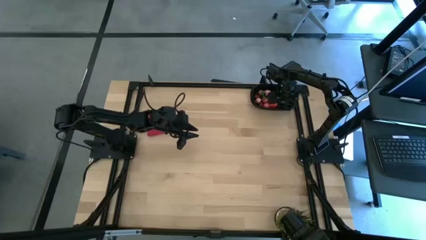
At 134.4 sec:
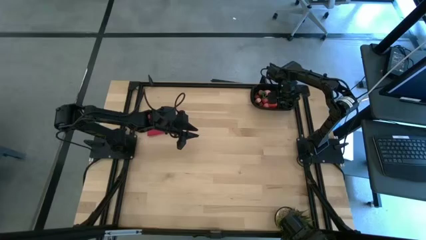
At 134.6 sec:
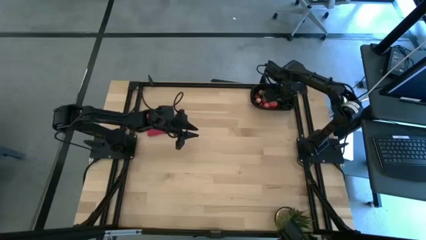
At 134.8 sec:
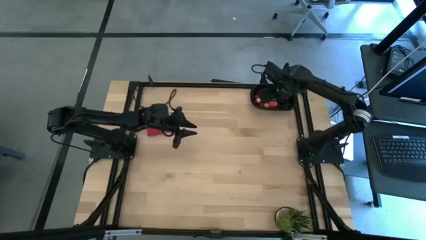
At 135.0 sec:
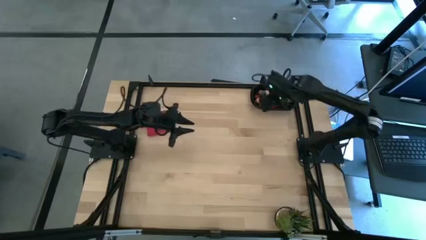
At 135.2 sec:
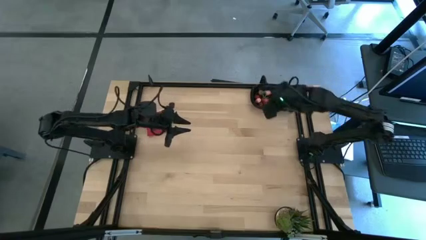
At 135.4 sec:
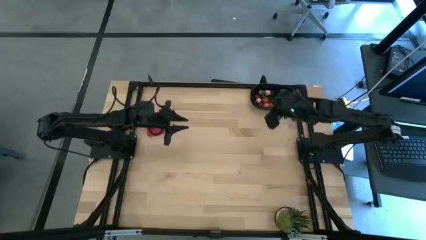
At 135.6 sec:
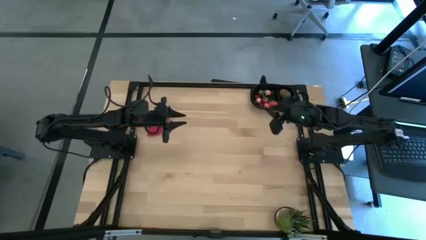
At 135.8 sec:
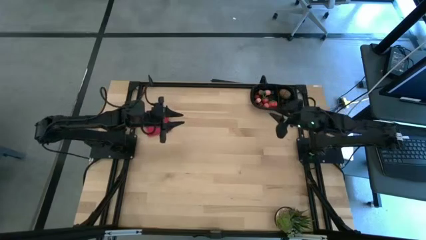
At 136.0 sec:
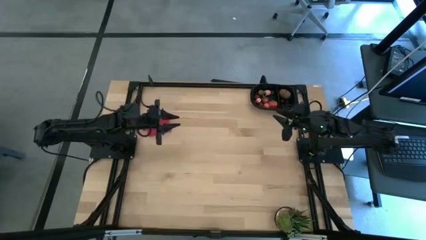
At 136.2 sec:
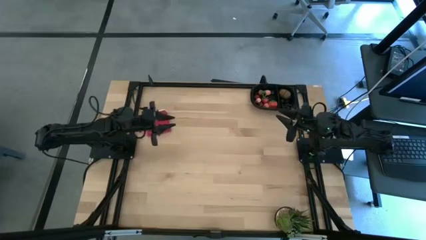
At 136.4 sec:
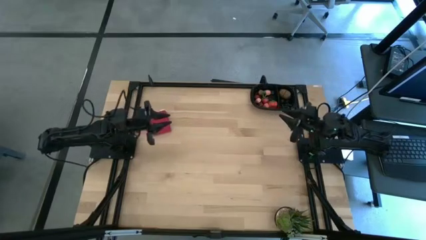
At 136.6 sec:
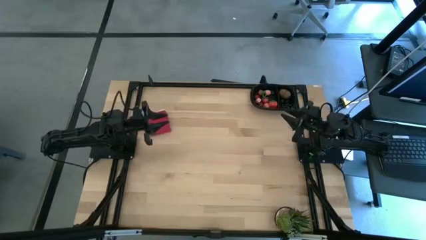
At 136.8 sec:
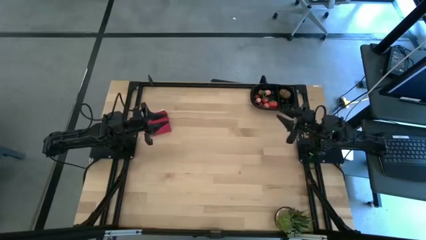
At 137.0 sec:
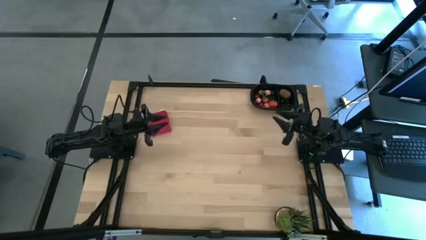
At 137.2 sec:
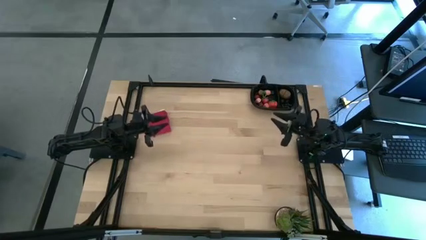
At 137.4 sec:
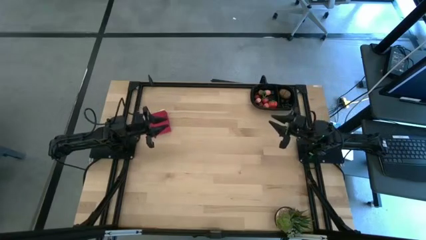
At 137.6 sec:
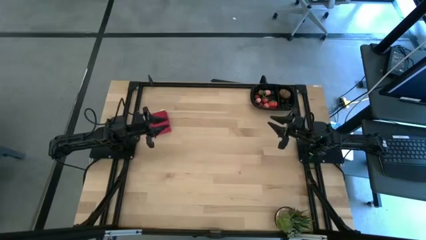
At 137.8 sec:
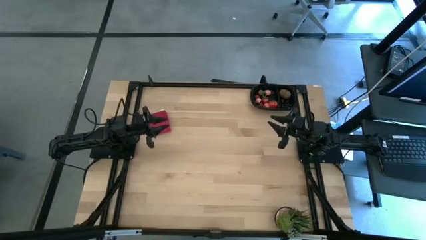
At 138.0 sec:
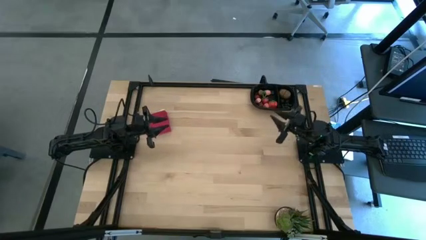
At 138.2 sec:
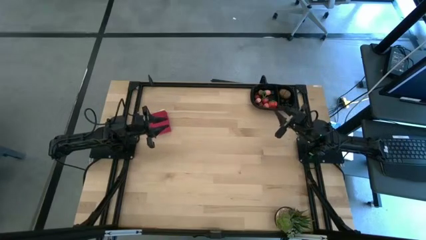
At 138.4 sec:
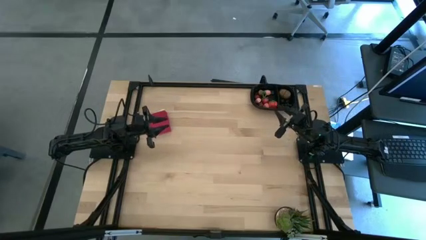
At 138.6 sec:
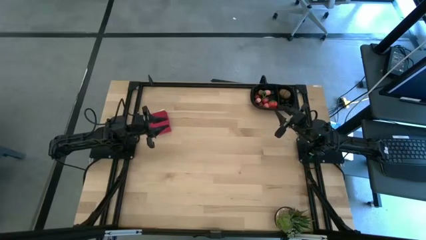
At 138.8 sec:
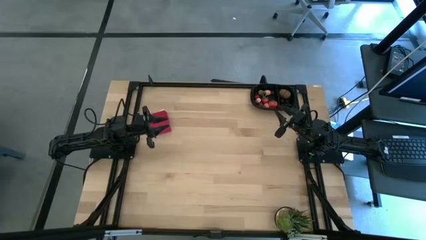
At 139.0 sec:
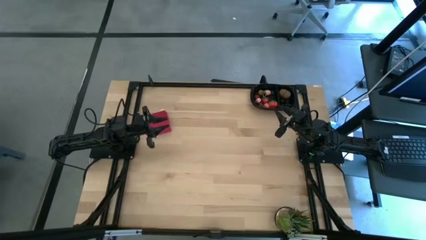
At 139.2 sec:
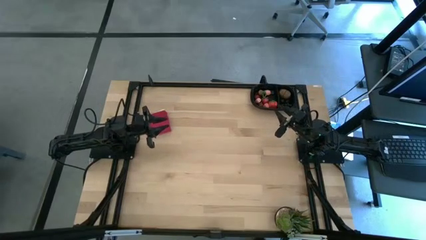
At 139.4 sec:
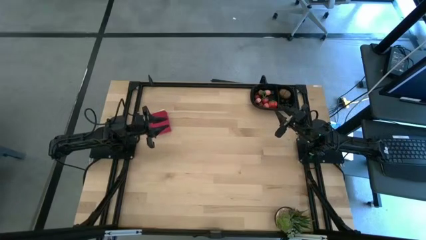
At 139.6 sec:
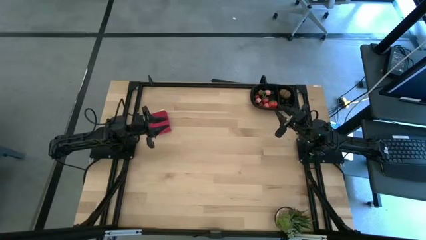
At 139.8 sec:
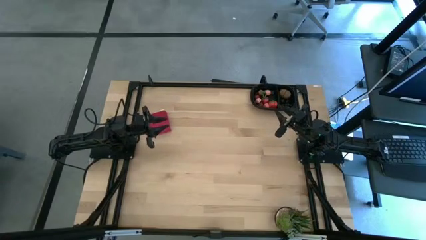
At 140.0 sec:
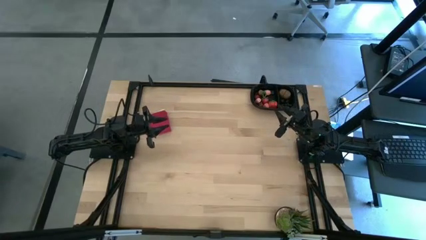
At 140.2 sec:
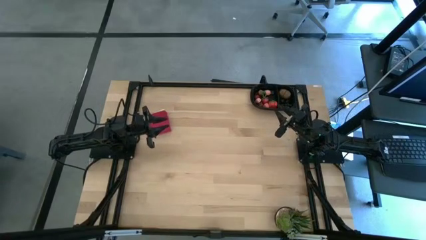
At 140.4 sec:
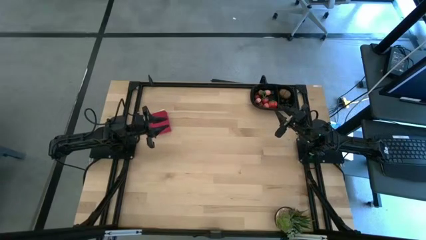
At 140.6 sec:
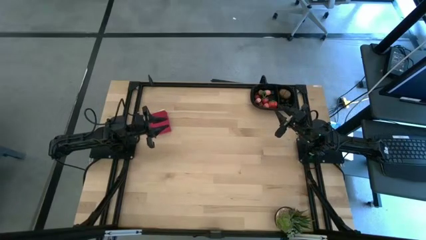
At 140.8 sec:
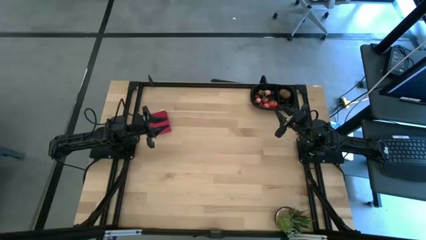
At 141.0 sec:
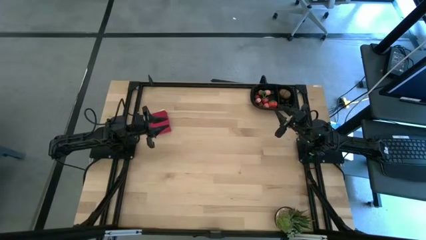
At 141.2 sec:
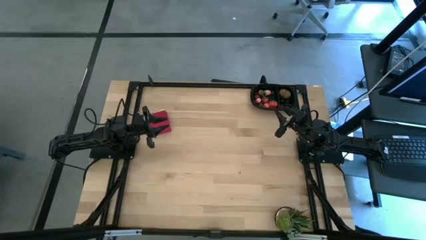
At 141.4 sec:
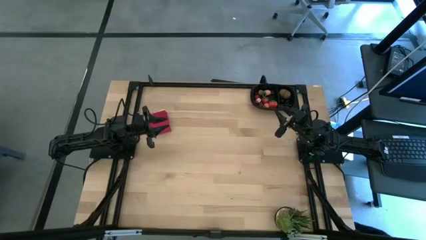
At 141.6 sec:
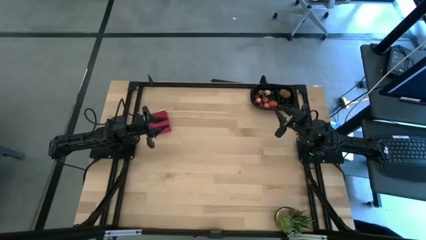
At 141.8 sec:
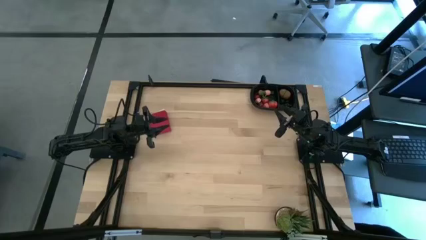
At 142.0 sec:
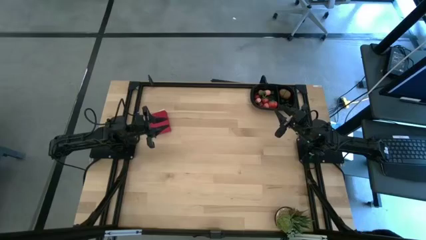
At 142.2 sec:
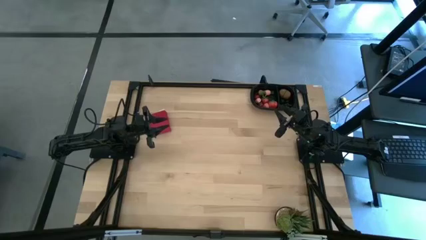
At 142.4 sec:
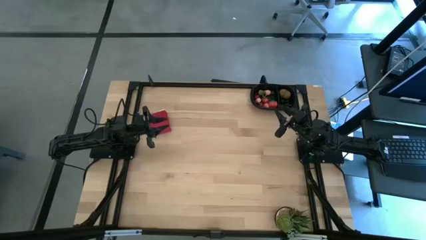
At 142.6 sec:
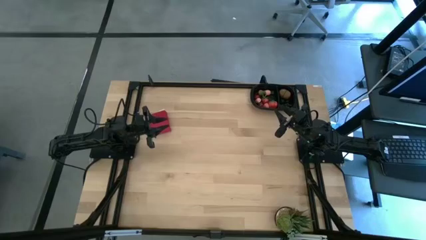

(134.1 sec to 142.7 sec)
Task: Pick and placing Produce into tupperware
Return to Home Position

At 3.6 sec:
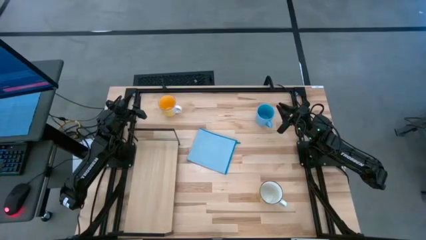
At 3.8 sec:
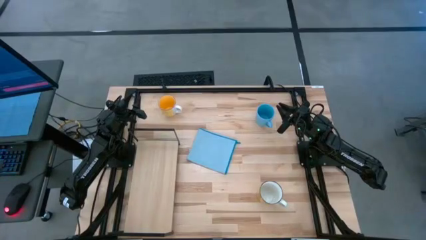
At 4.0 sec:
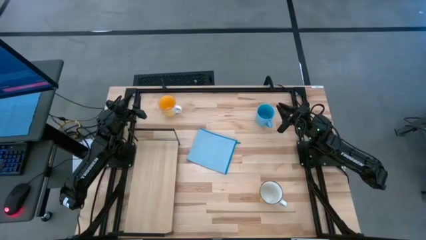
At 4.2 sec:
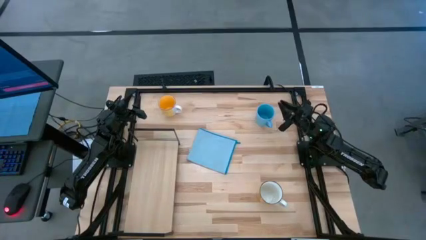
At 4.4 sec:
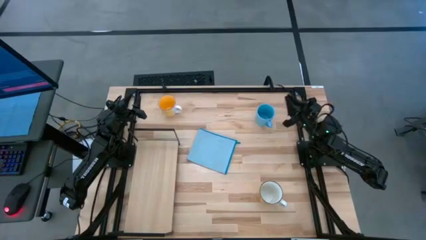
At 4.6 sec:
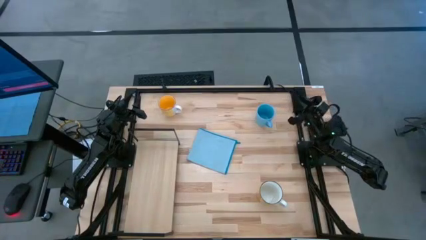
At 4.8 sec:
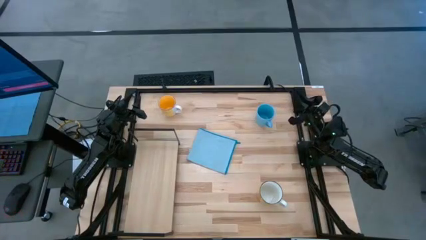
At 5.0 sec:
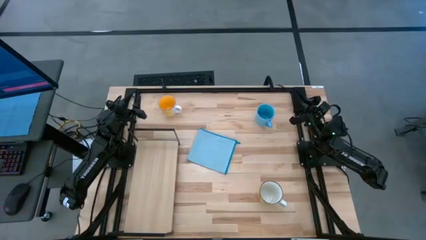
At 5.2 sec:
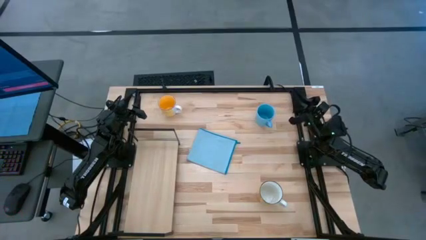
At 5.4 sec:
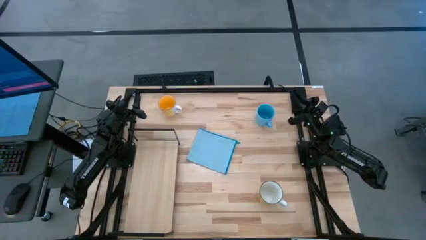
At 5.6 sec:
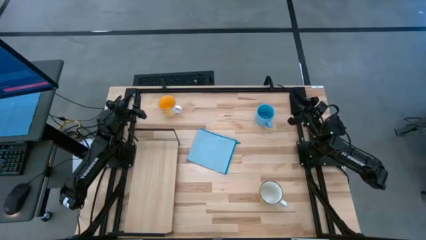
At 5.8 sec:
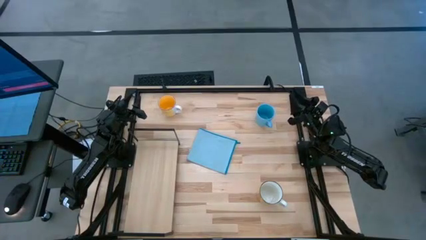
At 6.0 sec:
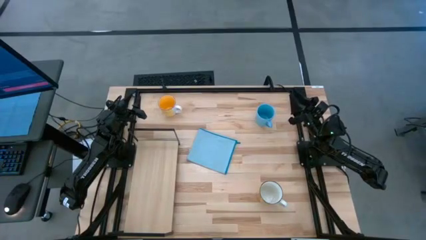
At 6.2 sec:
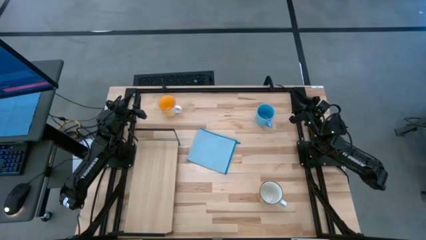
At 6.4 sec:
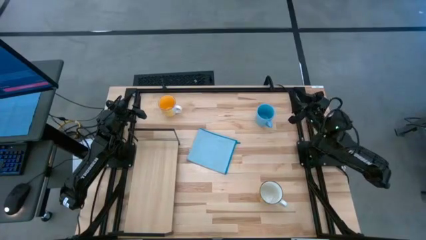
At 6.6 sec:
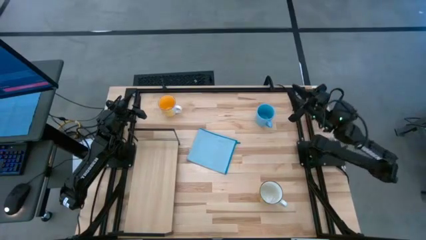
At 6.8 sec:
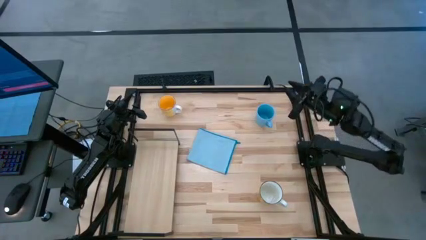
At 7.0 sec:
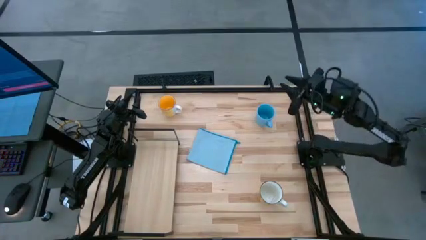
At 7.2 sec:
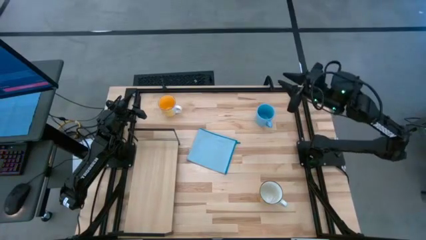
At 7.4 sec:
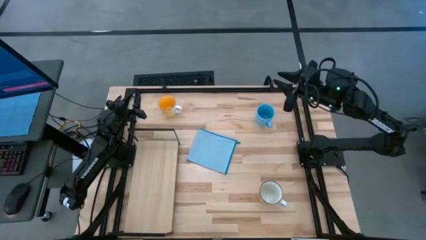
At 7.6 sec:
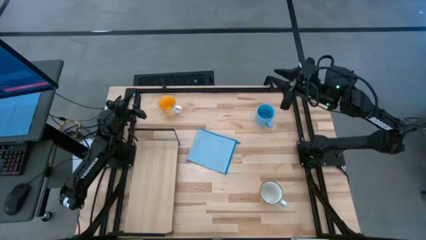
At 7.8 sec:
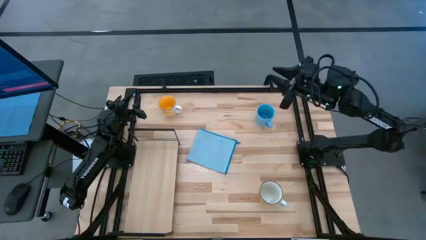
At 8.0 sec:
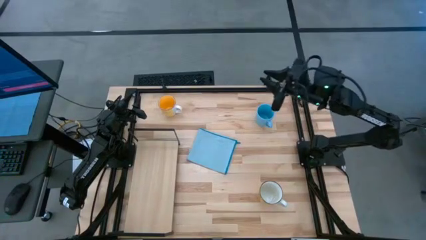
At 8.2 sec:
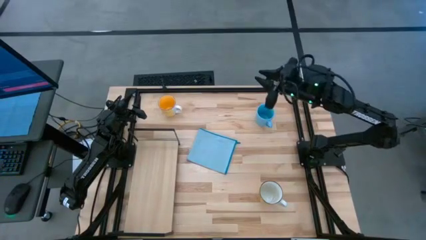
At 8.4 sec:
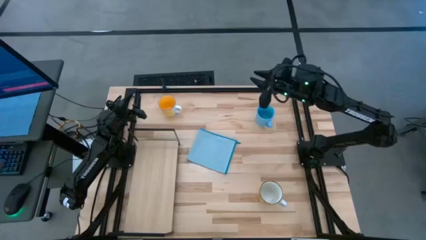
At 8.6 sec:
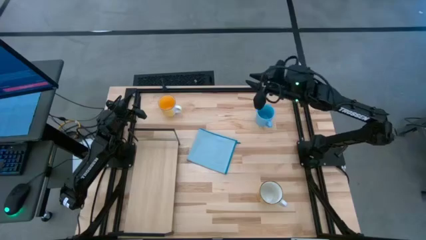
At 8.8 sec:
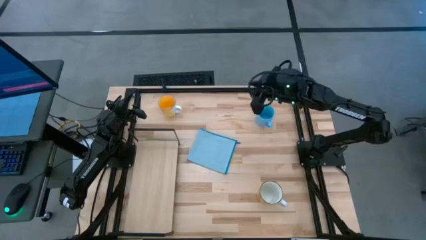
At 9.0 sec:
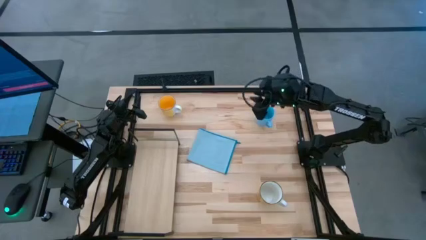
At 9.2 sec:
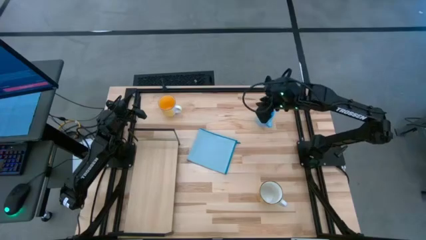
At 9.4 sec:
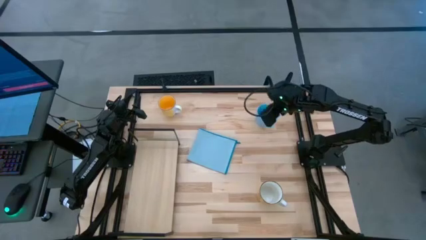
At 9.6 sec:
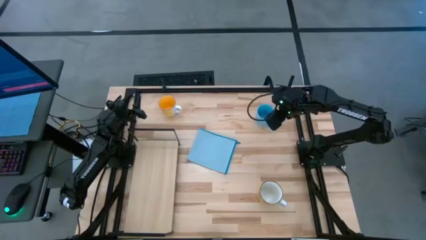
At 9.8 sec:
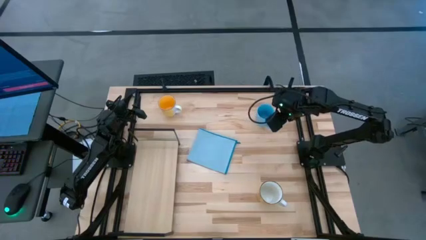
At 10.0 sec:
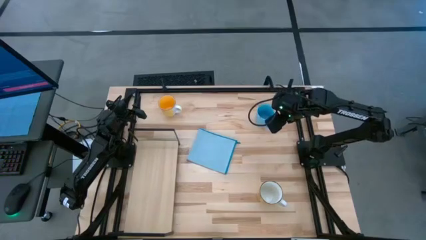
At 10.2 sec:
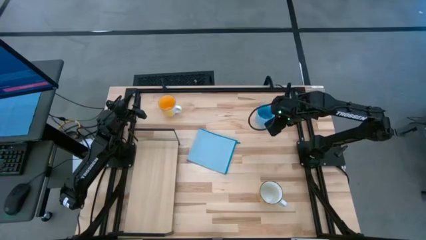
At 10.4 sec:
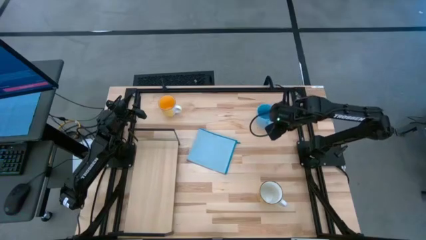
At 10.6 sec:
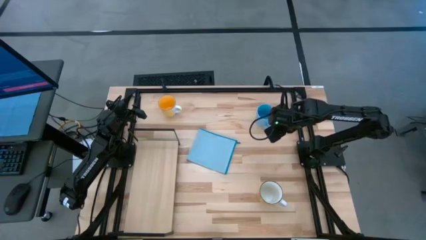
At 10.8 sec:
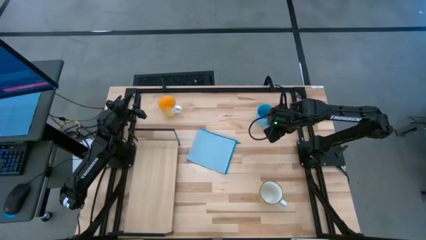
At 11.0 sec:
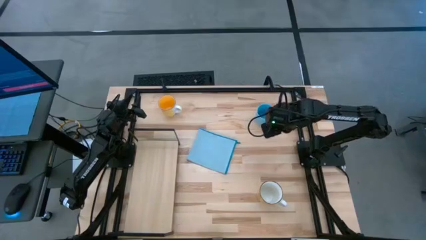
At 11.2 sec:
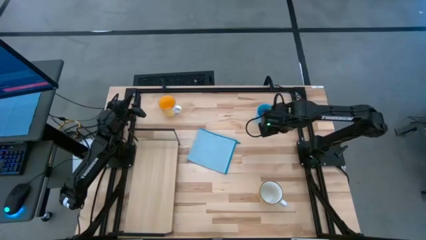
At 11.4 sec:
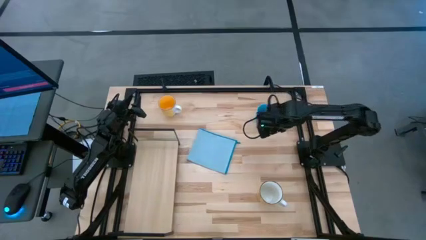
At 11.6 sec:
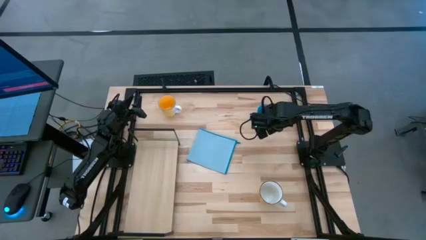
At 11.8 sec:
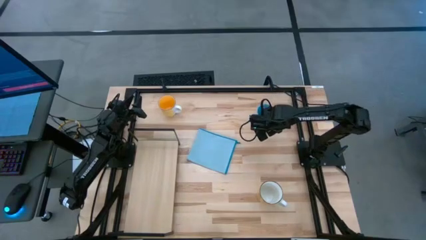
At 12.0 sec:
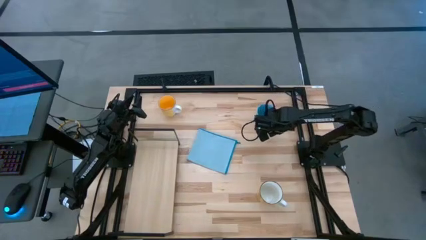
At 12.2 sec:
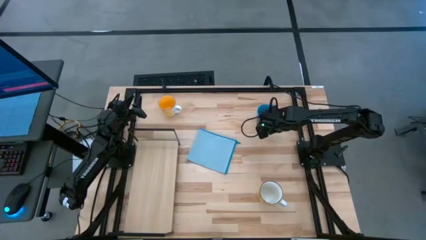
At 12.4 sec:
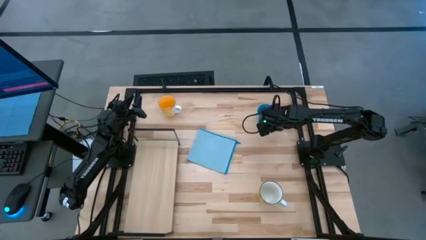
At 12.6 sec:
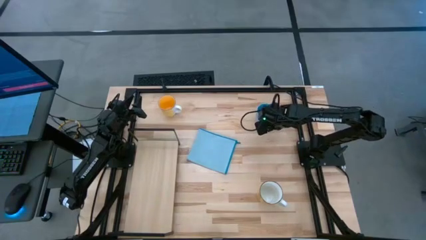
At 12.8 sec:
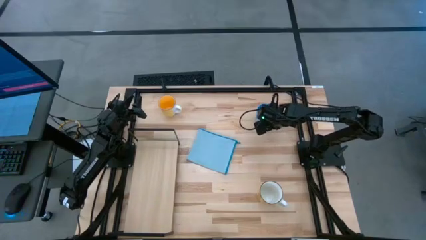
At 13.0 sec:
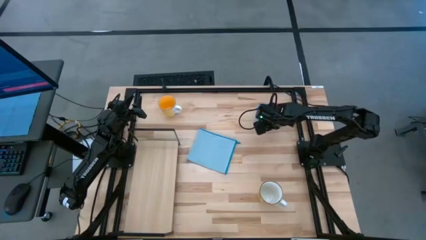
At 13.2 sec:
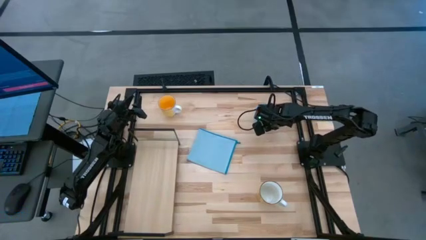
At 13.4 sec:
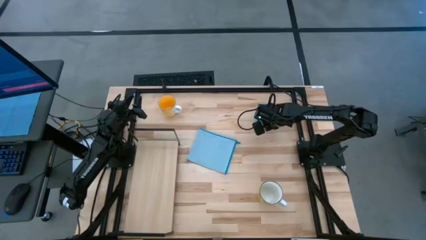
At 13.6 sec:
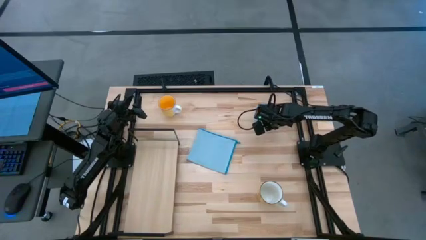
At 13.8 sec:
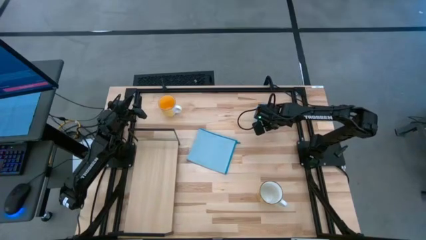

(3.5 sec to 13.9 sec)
Task: Stack small to large cups/mugs on shelf
Put the blue mug on the shelf
